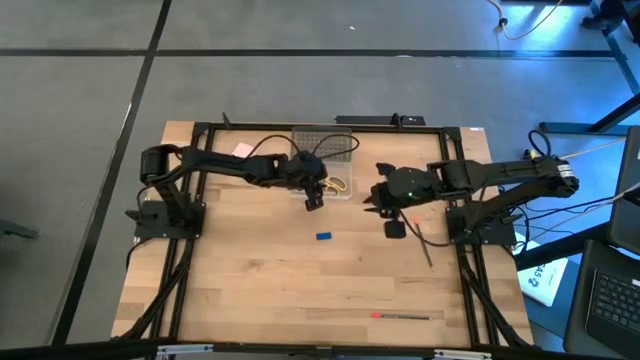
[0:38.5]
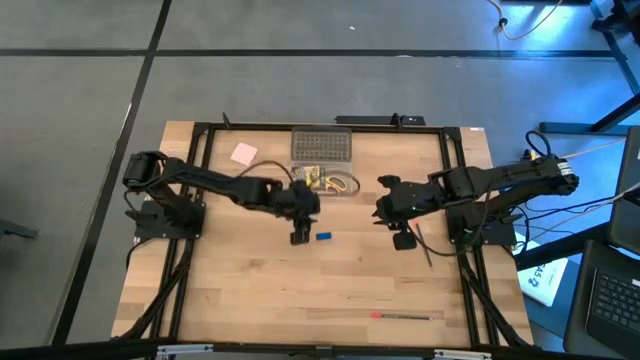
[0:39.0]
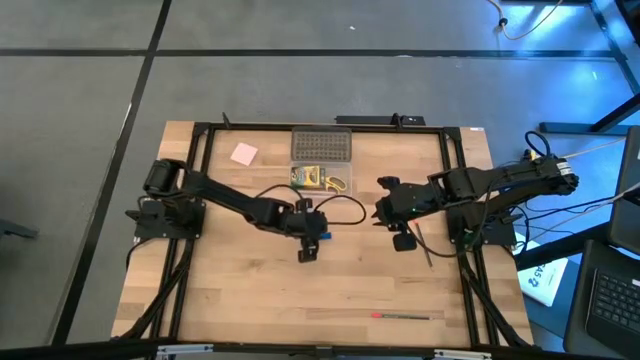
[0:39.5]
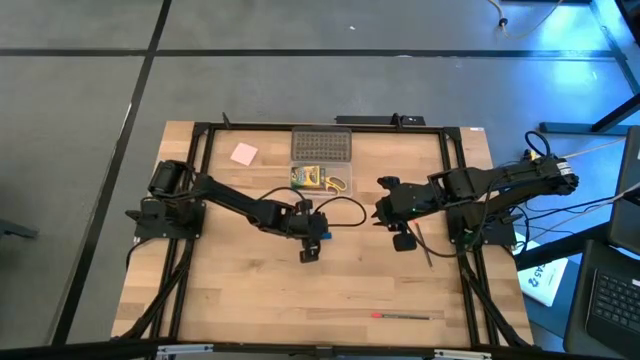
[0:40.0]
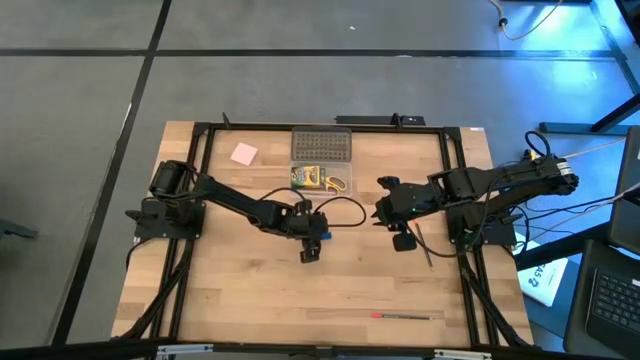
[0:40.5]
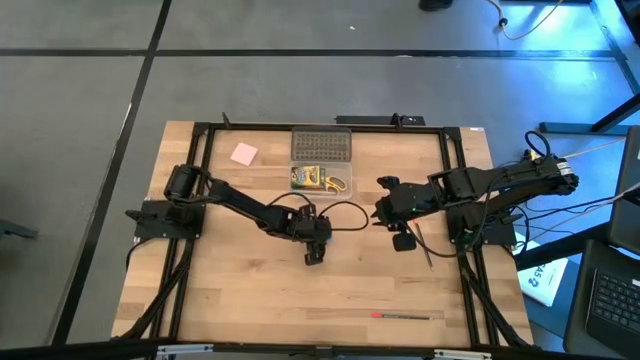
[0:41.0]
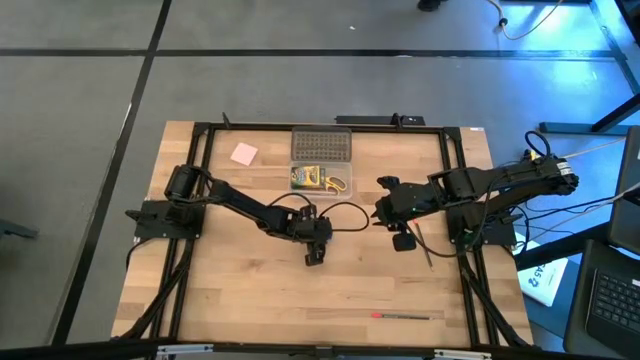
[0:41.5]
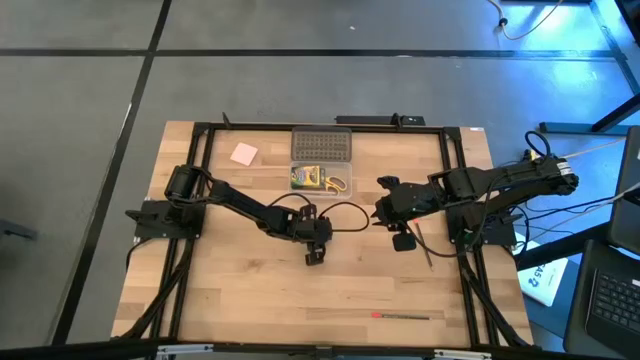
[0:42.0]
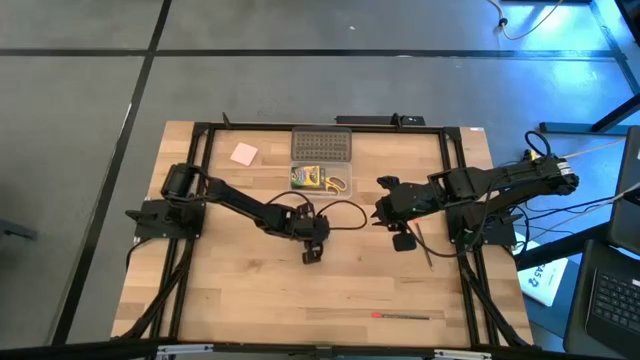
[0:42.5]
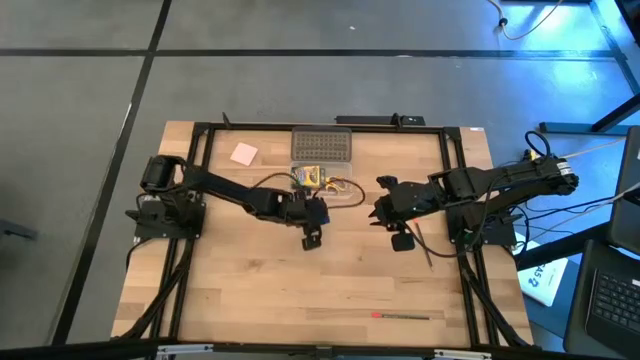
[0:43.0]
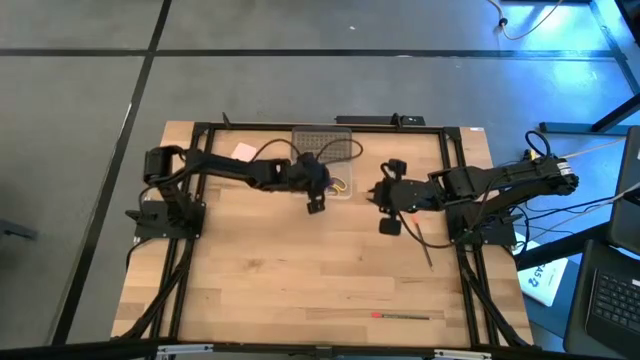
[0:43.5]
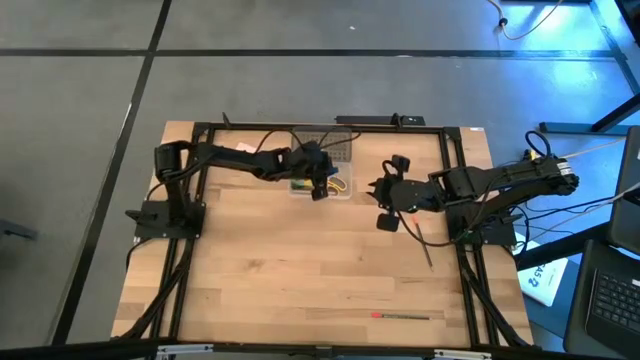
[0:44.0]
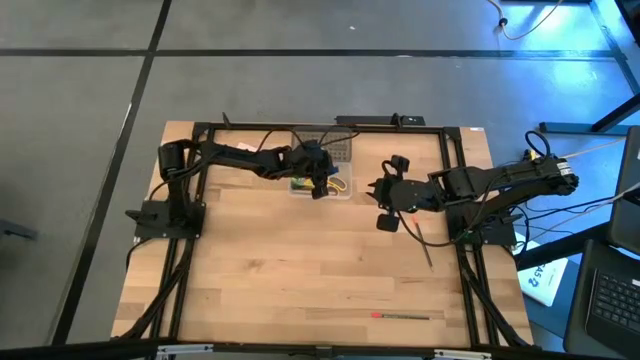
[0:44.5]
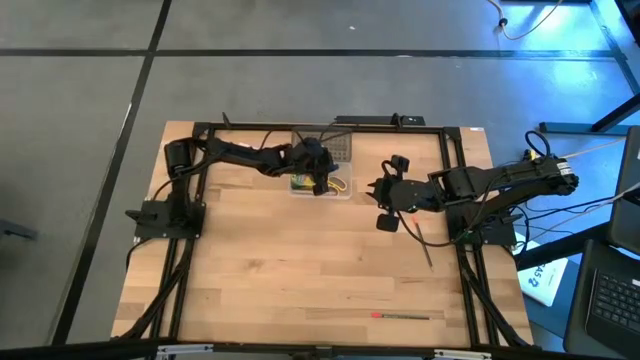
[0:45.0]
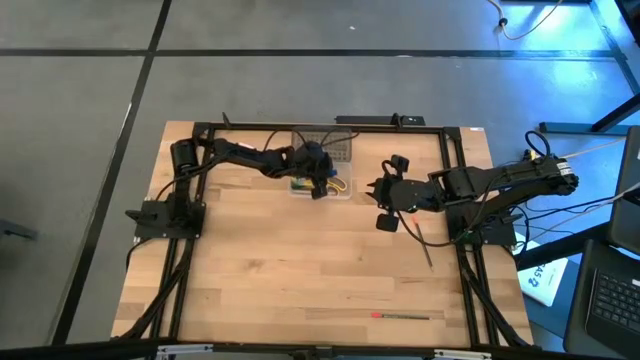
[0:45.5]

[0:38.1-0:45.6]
Task: Pack school essentials
Put the blue eraser into the black supply box

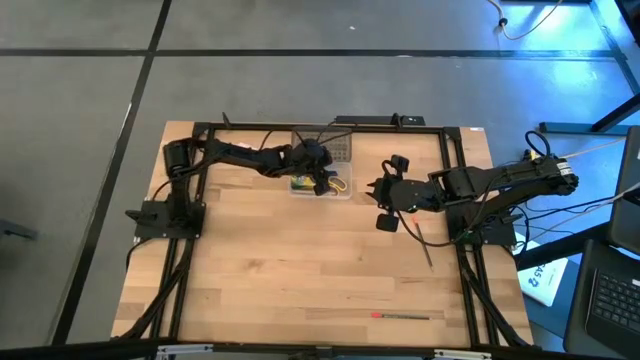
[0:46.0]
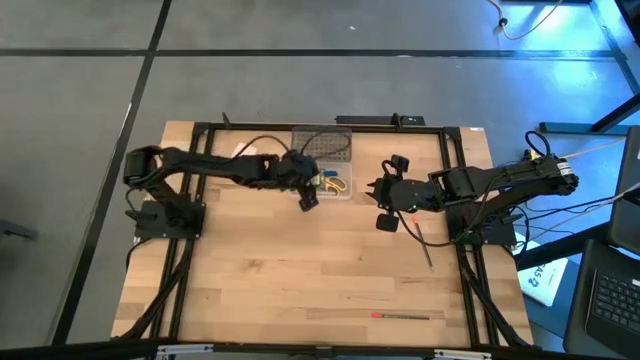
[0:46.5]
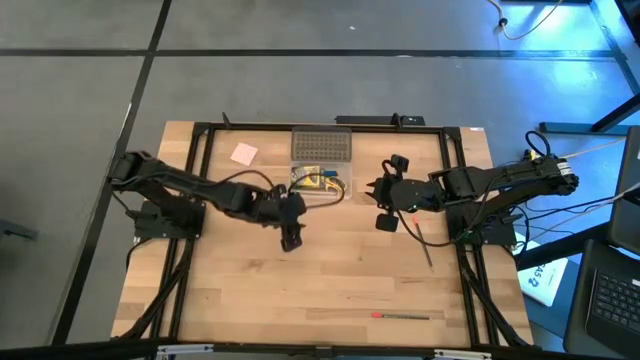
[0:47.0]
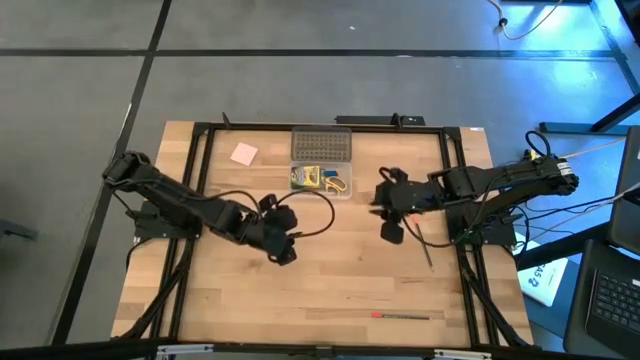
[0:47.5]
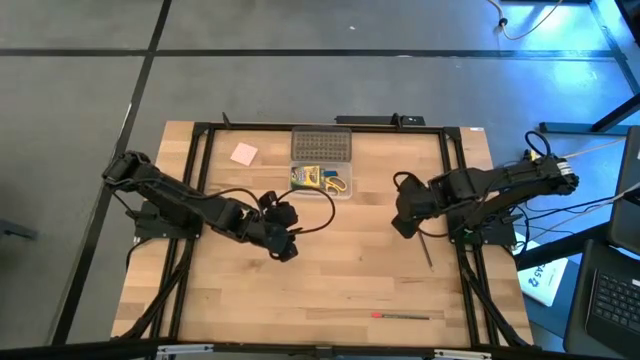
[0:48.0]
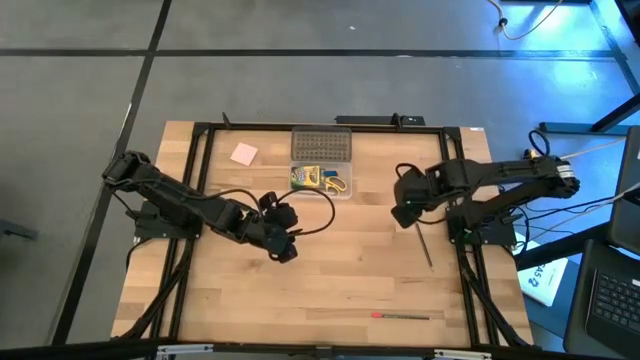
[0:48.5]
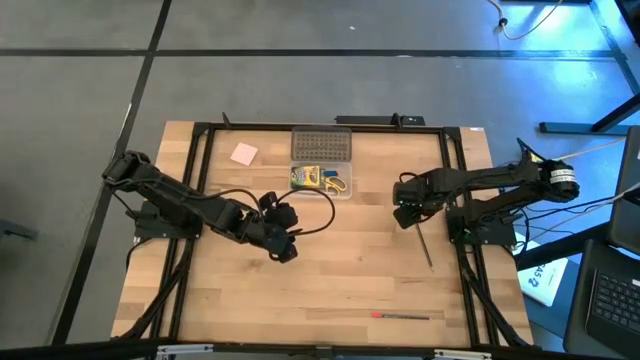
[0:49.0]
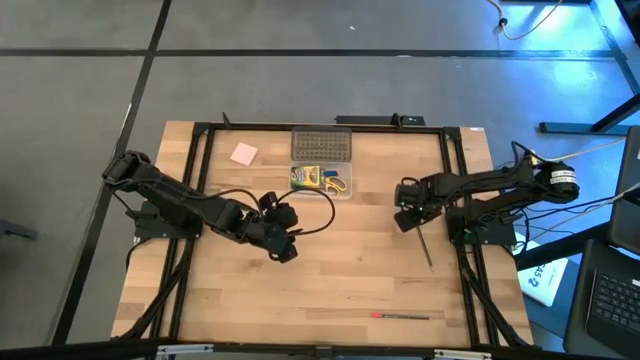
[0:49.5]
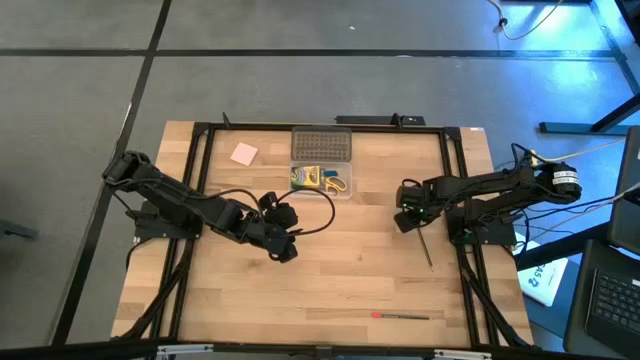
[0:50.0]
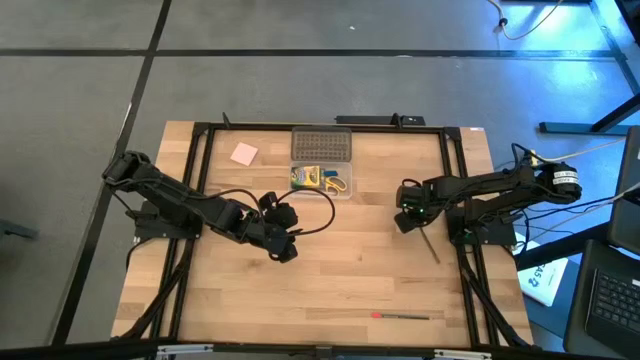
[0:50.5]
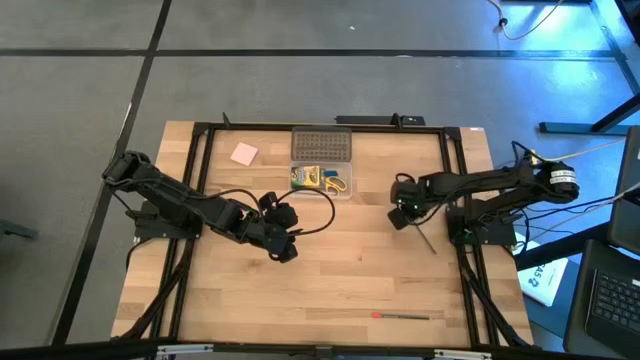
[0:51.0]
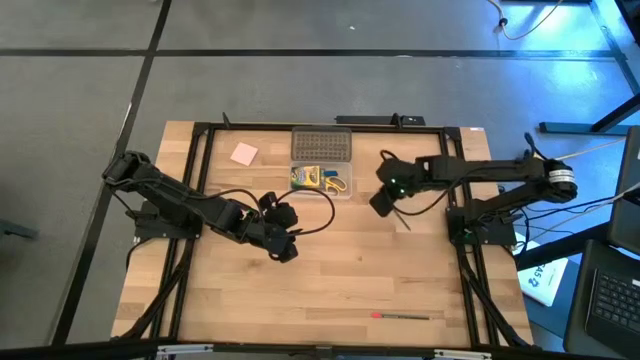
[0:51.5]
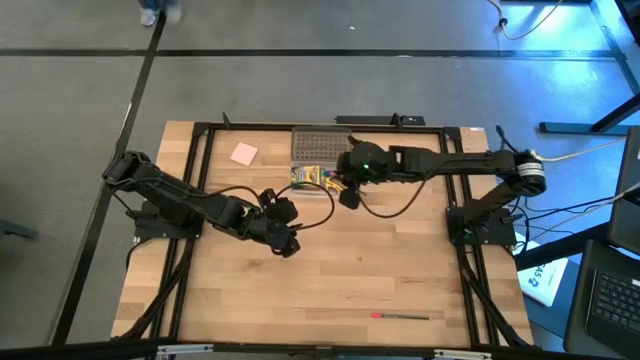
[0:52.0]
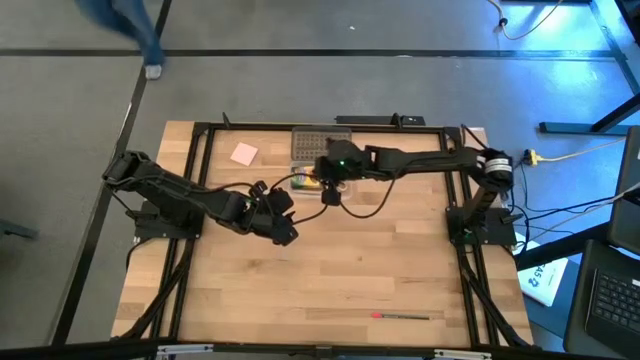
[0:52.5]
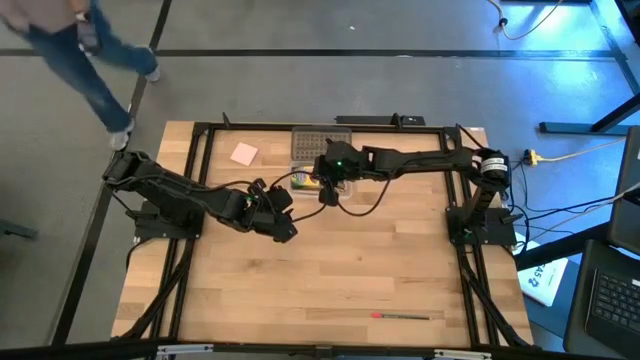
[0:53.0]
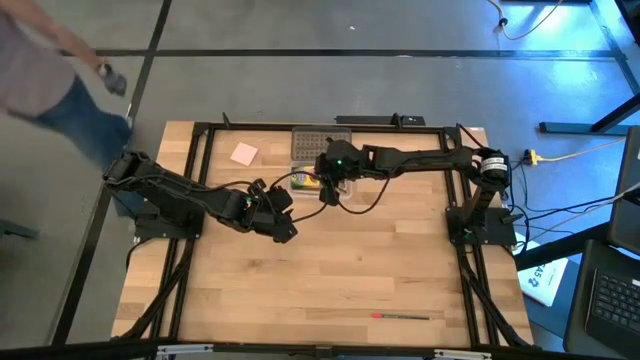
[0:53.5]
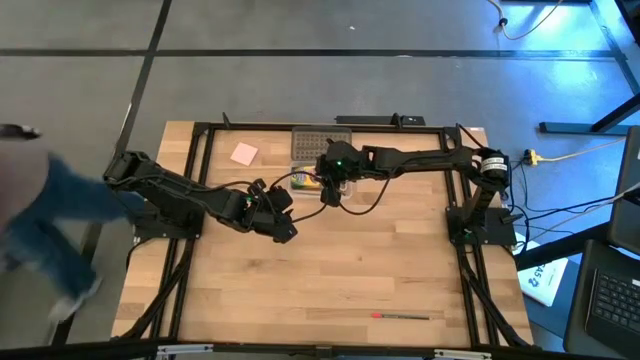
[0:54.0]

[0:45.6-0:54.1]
Put the top black pencil into the black supply box

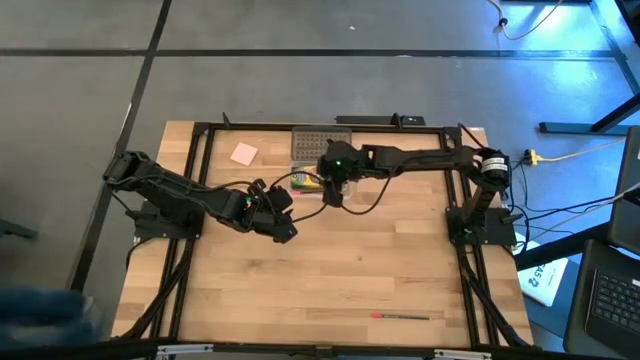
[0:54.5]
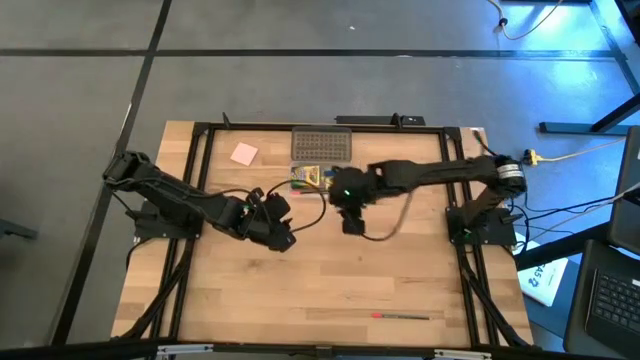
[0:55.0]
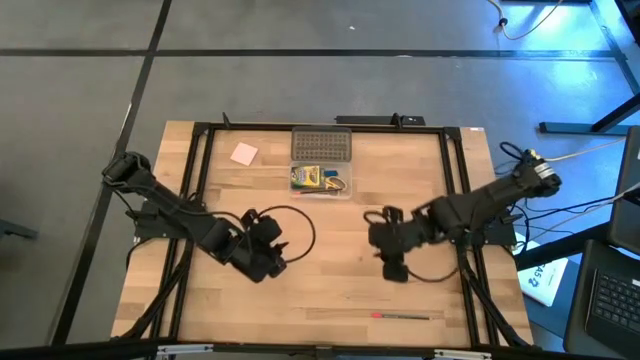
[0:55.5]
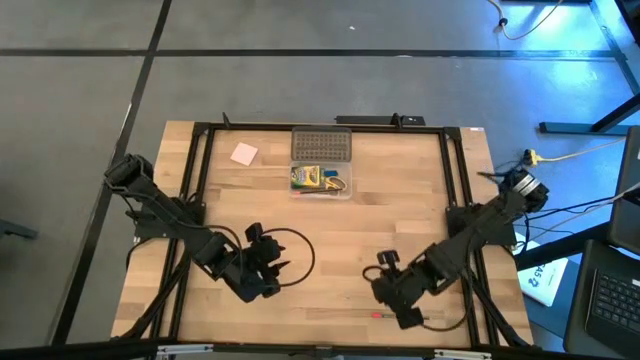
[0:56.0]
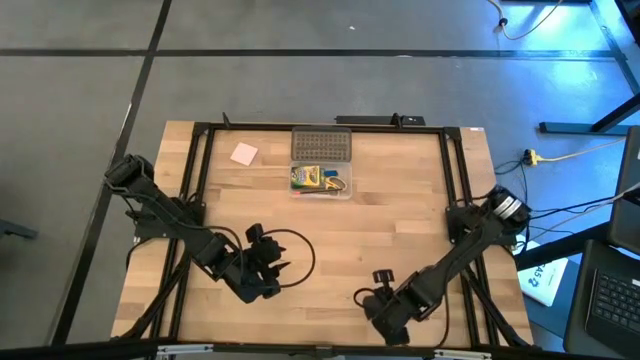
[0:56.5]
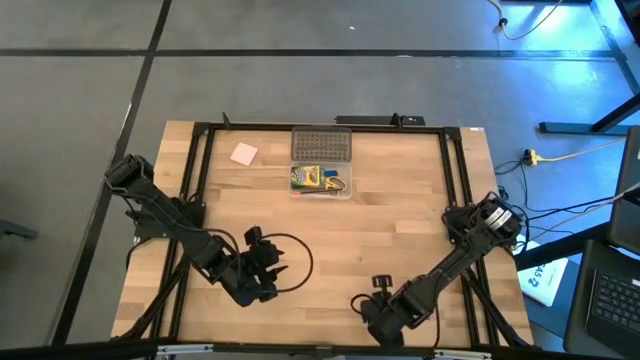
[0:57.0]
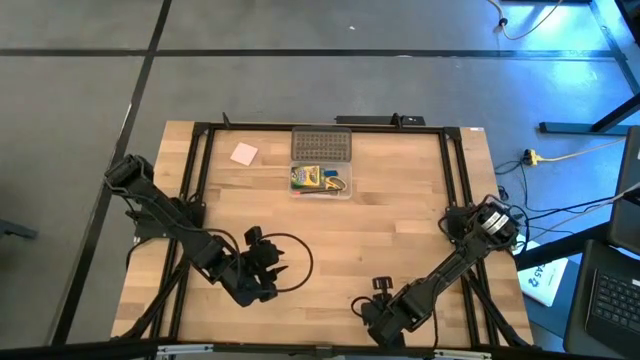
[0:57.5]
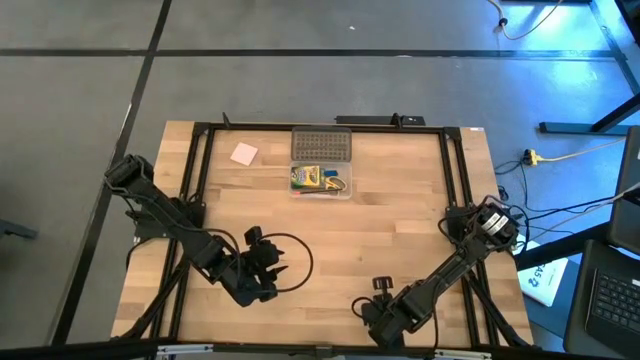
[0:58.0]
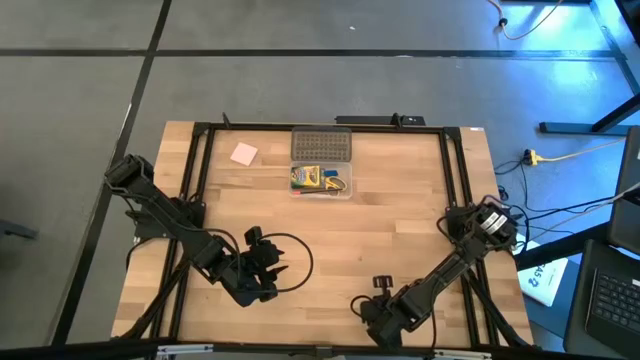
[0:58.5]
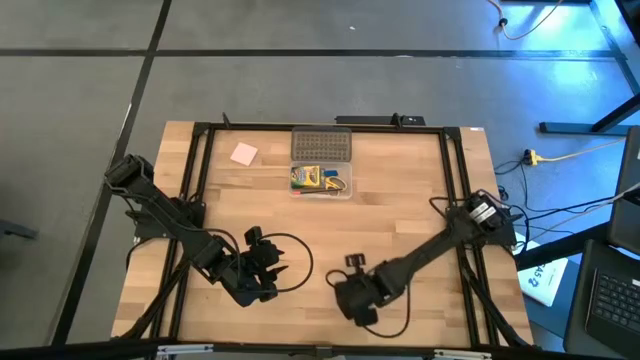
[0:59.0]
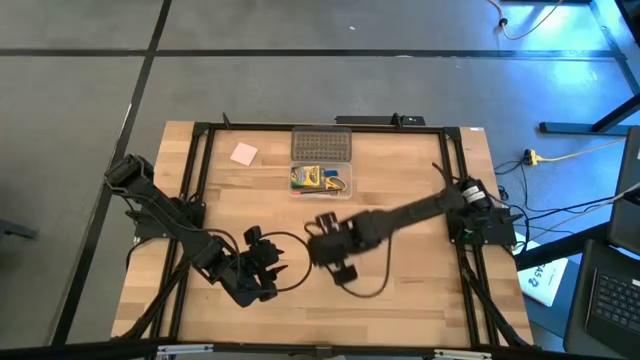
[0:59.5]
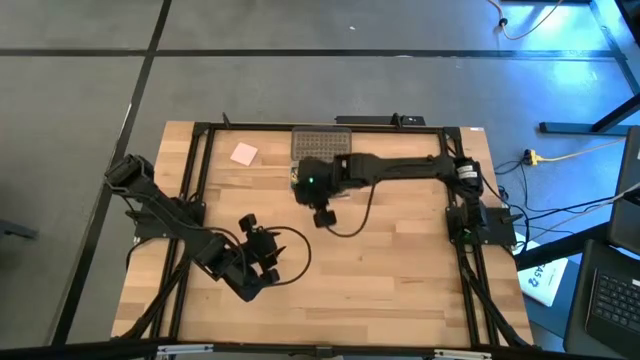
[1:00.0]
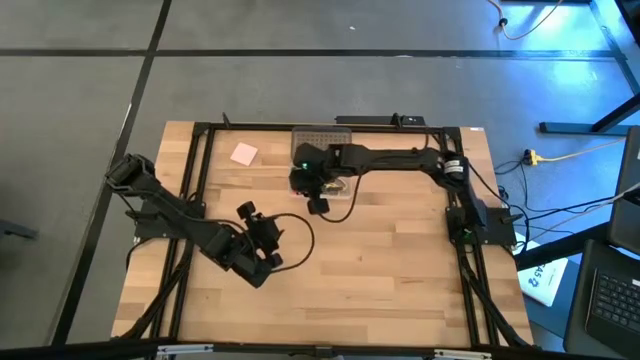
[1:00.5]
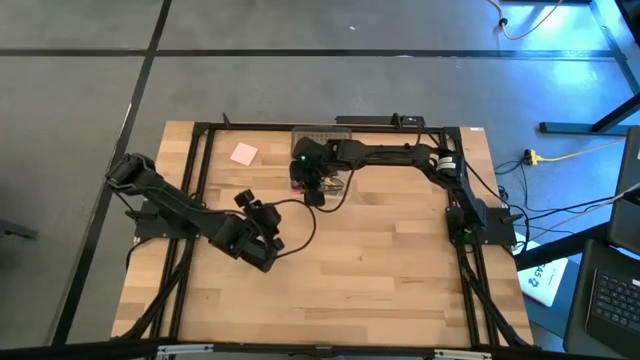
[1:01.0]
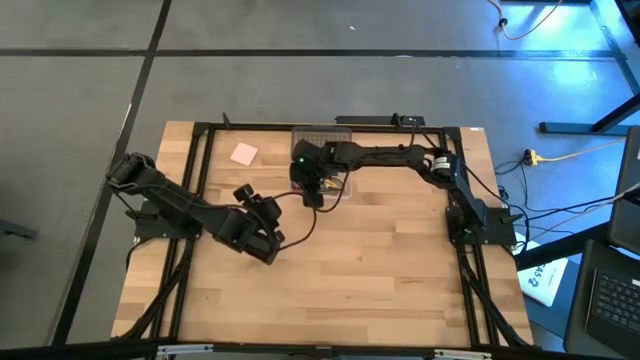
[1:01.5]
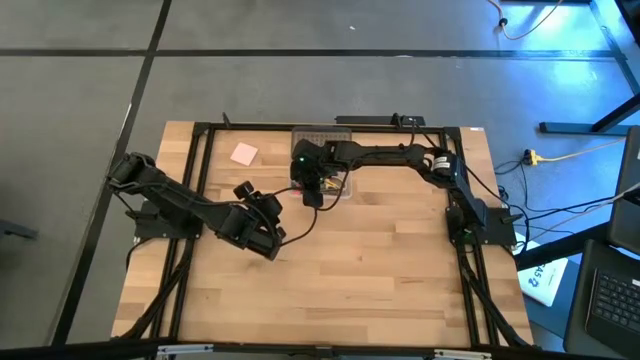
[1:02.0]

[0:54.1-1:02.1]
Put the black pencil into the black supply box
